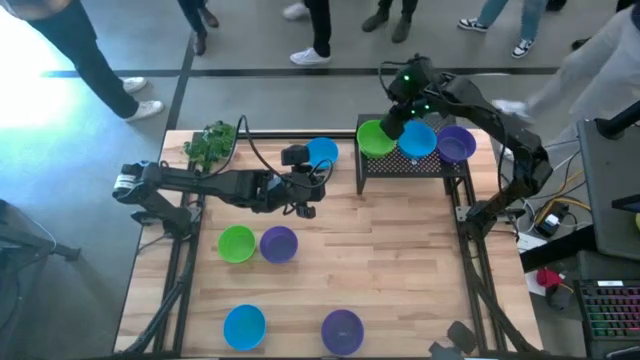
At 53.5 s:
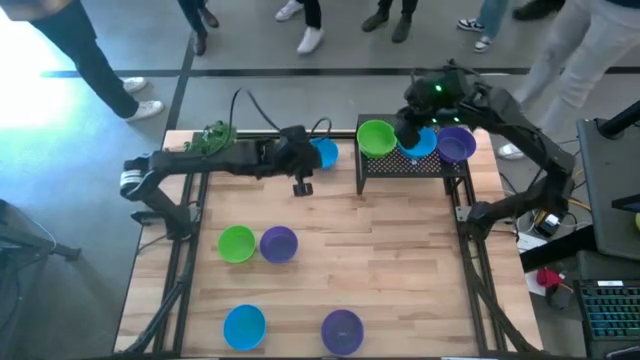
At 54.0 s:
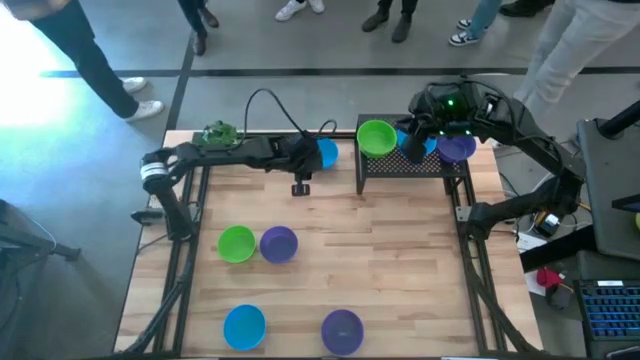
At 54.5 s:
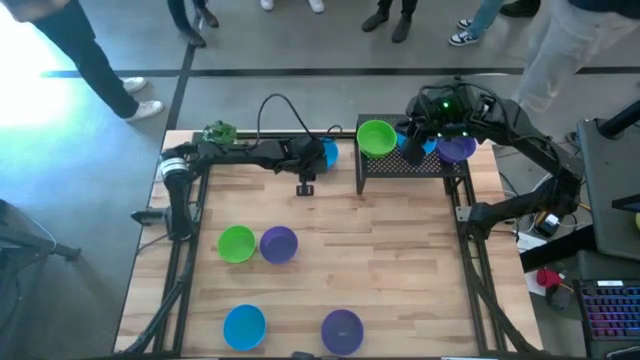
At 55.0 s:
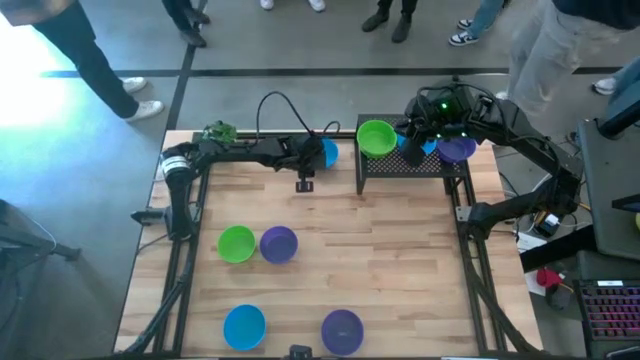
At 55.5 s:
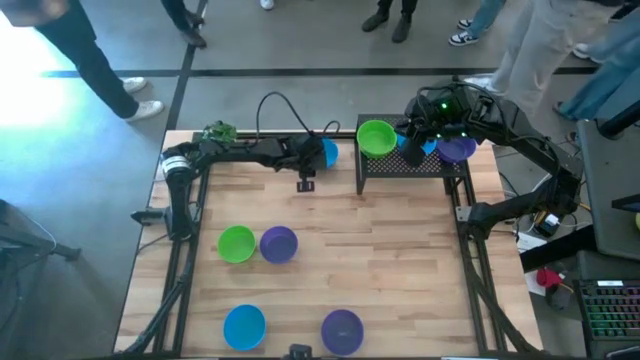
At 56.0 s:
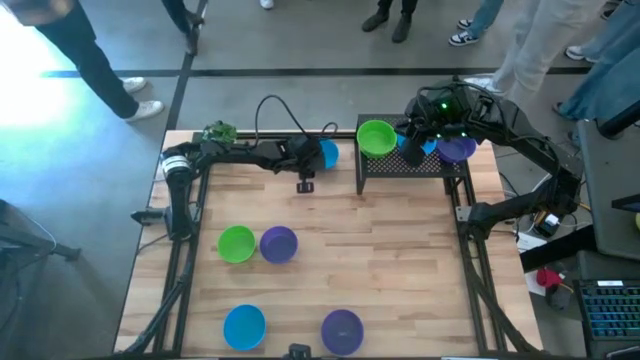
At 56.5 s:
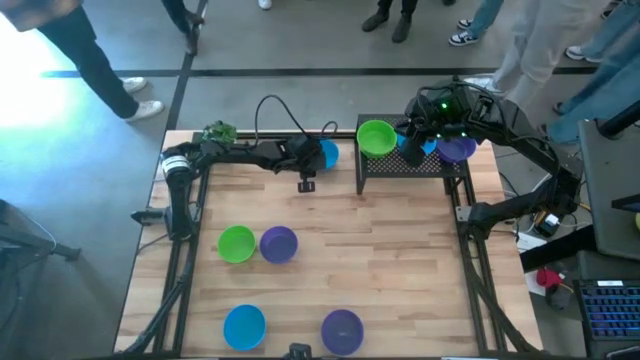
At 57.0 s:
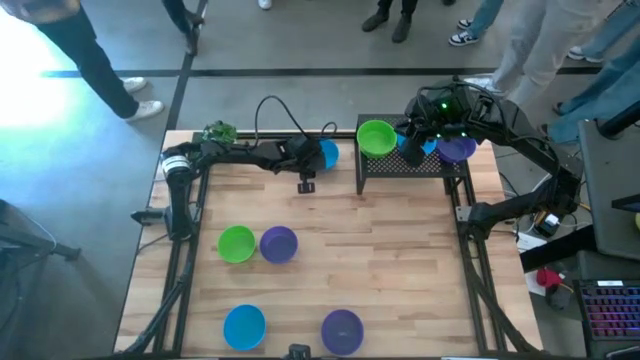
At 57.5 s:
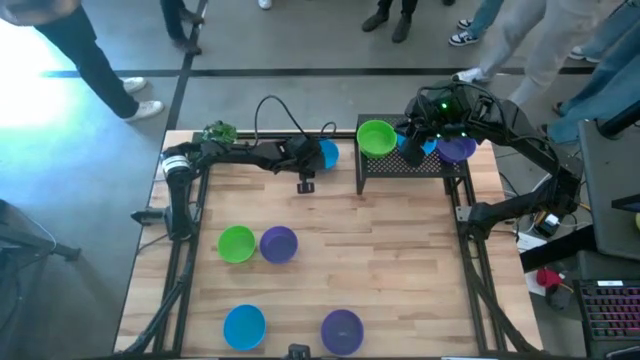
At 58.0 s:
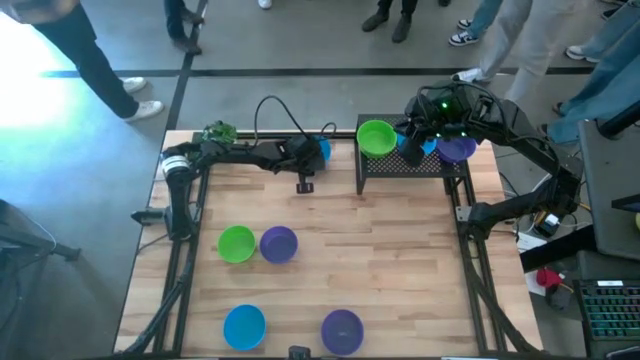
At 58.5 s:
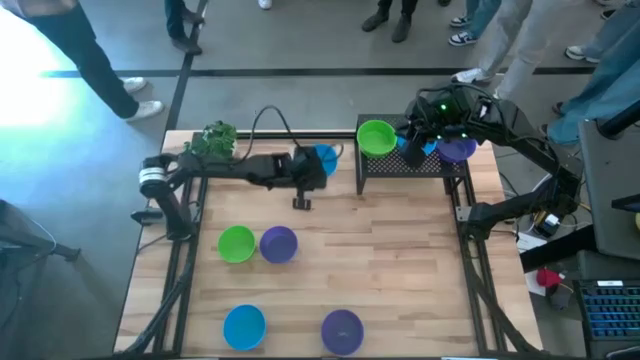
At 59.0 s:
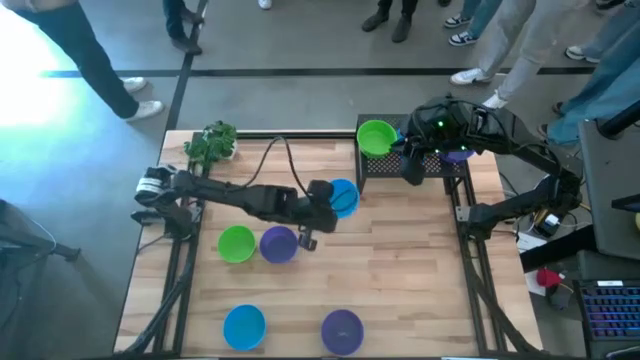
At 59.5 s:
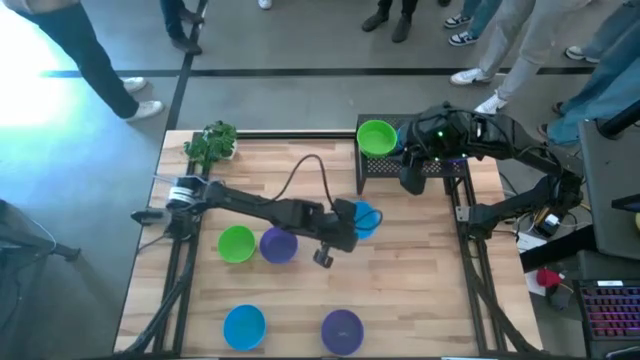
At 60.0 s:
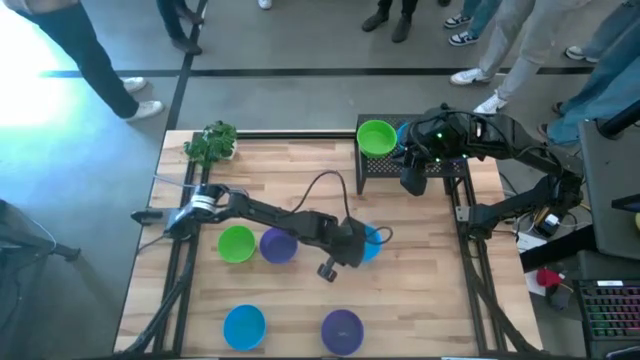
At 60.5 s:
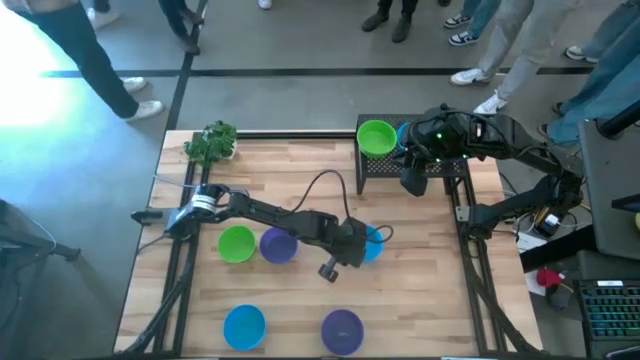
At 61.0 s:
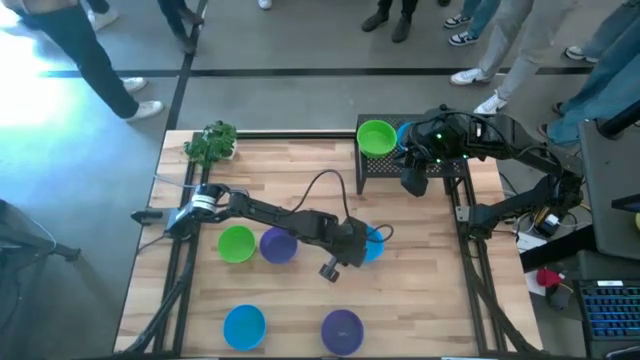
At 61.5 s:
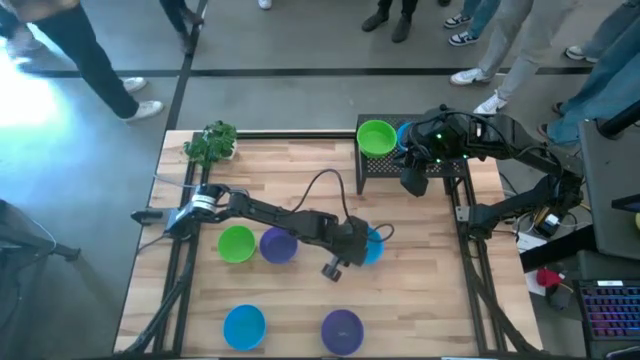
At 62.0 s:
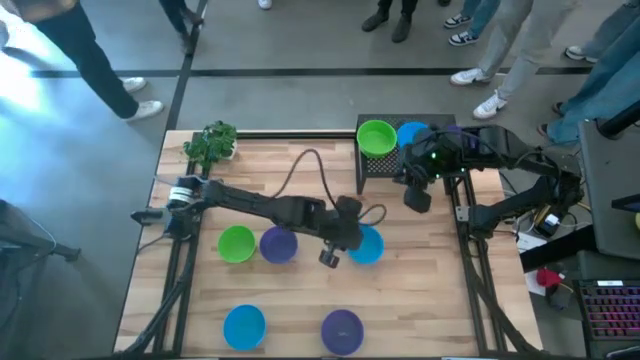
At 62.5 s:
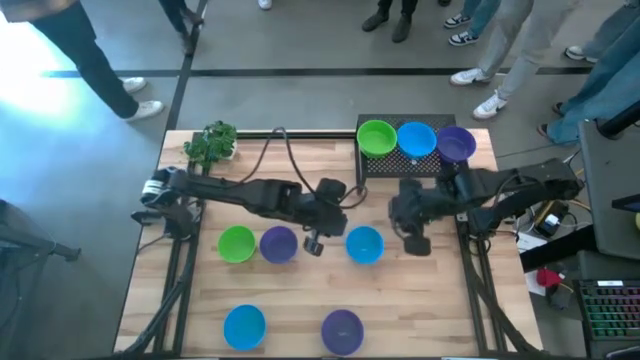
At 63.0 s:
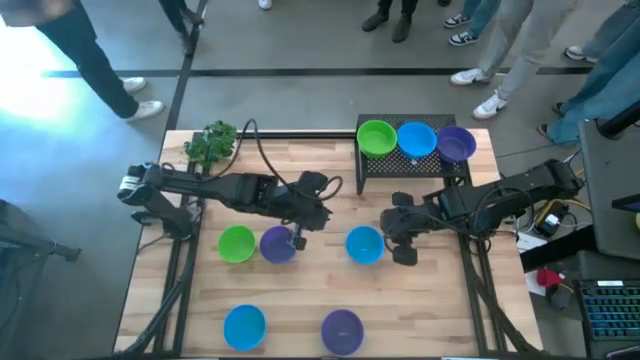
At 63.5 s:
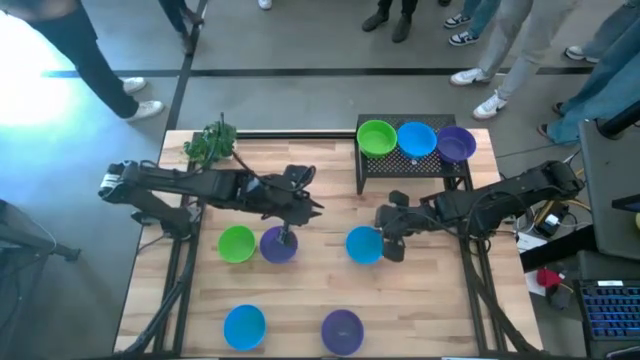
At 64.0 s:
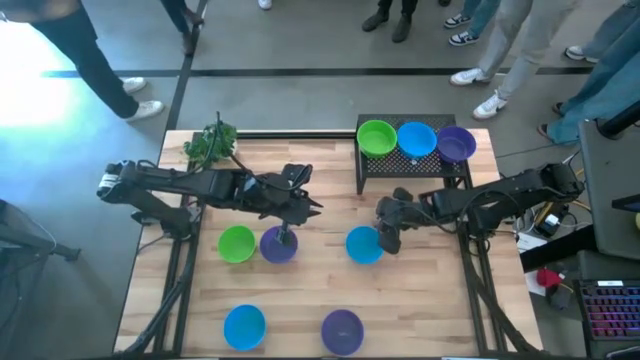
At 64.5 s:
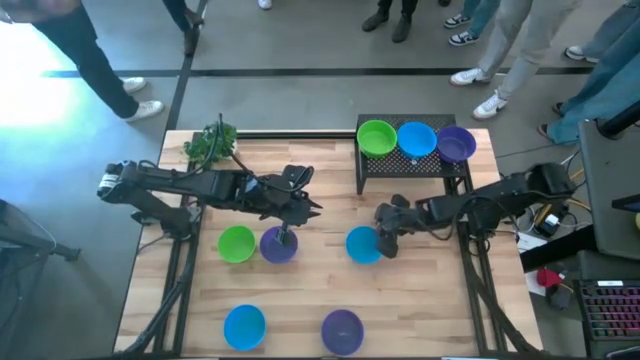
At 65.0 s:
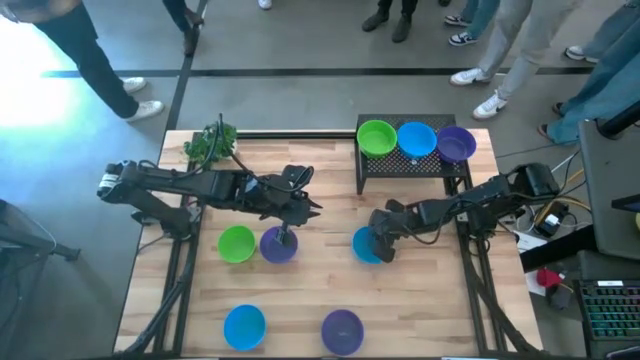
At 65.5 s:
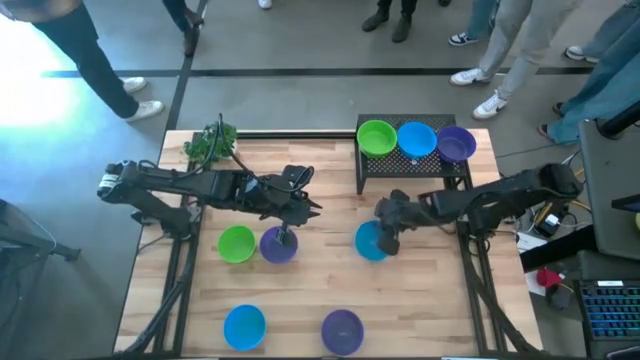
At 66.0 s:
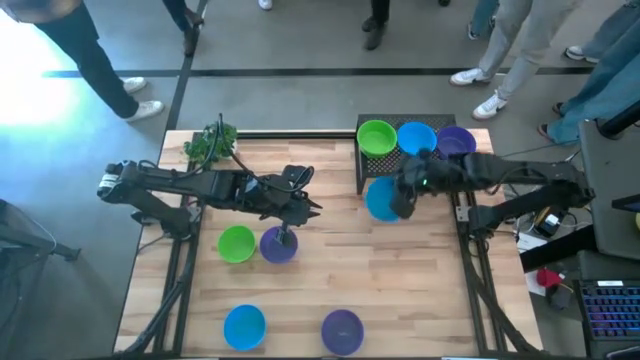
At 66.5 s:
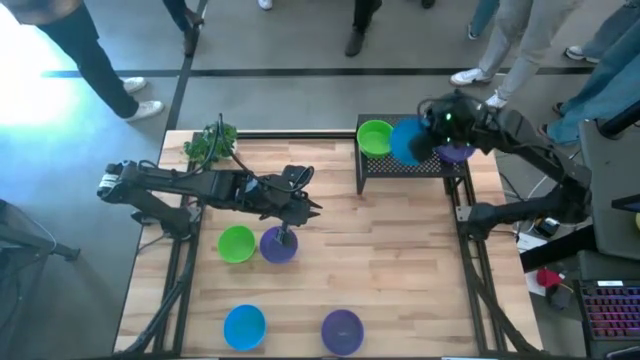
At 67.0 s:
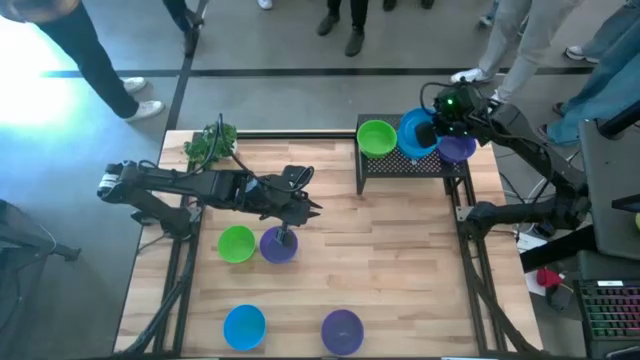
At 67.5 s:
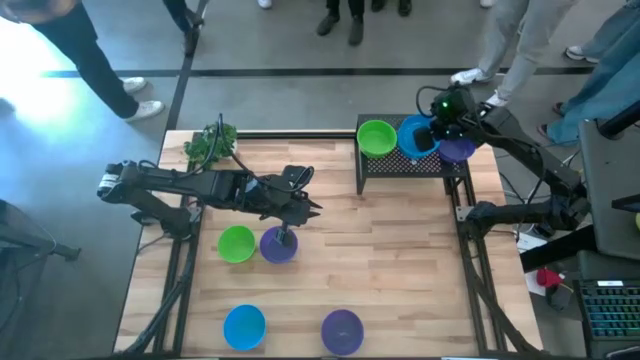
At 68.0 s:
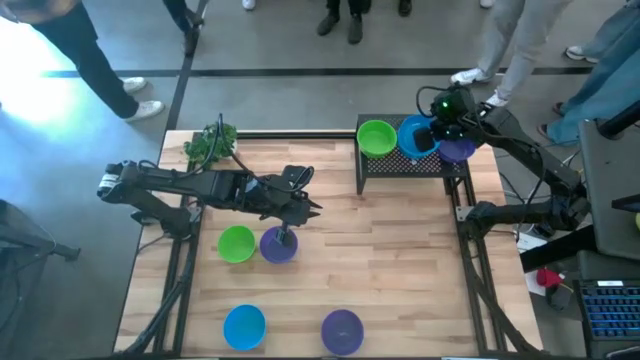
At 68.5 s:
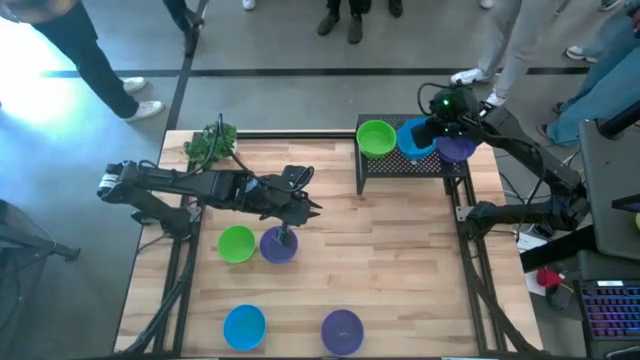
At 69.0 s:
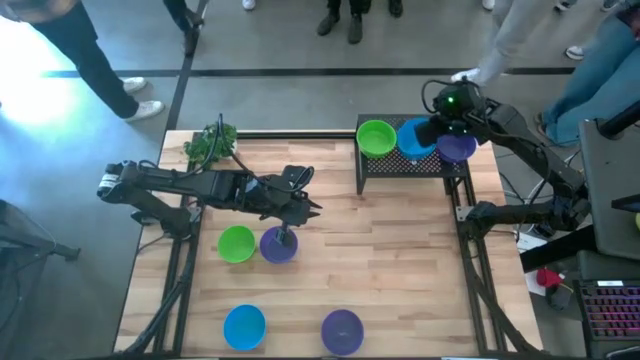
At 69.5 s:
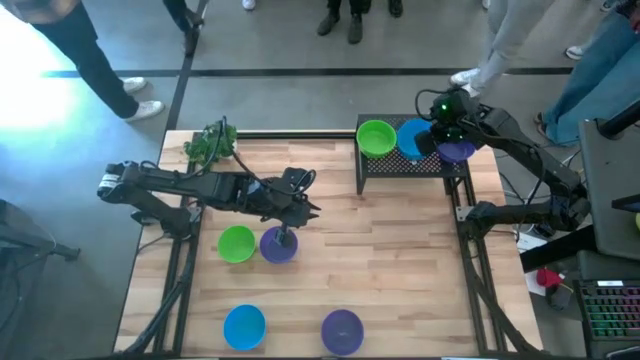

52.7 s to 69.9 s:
Task: Pick & Place Mini bowls
Stack the top blue bowl on top of the blue bowl on the shelf

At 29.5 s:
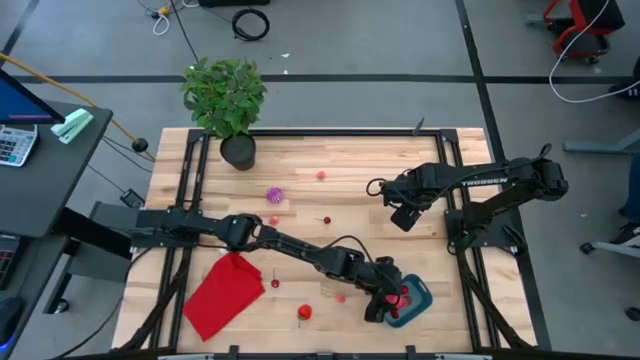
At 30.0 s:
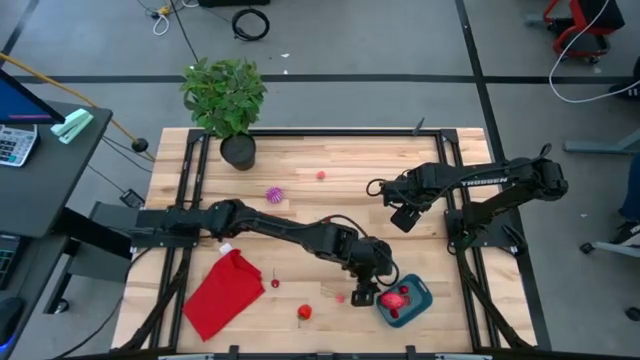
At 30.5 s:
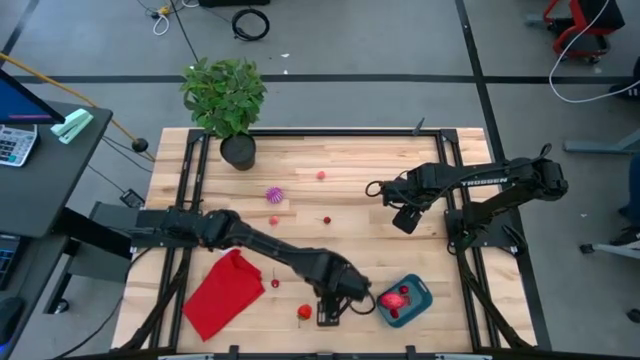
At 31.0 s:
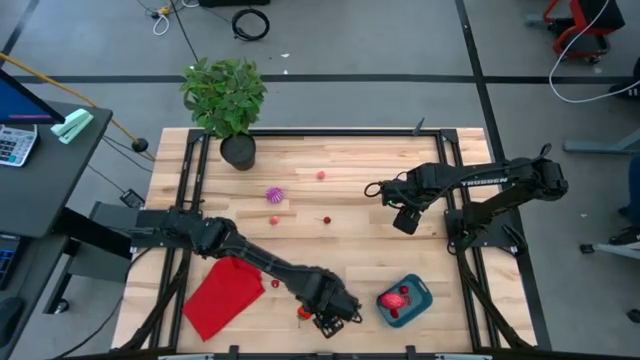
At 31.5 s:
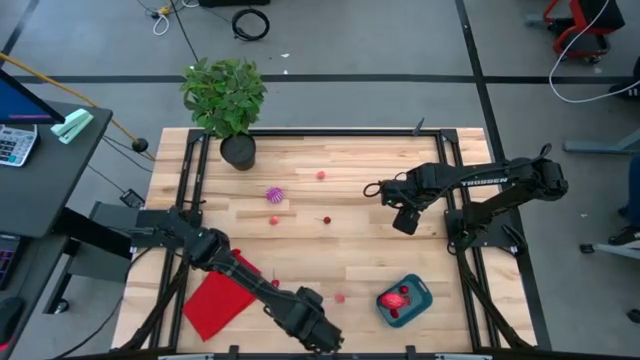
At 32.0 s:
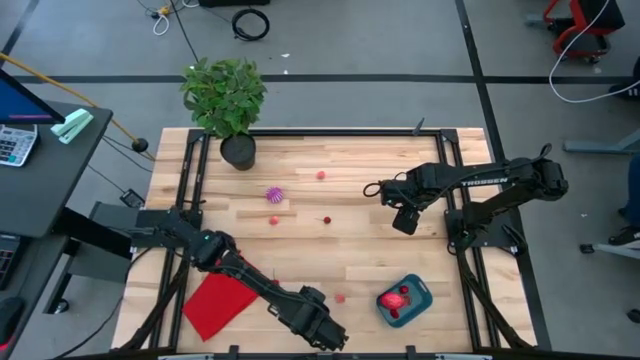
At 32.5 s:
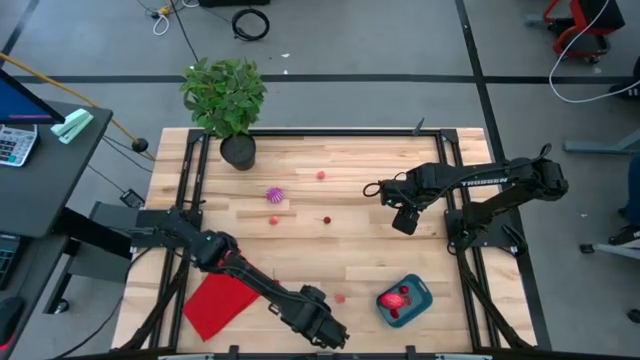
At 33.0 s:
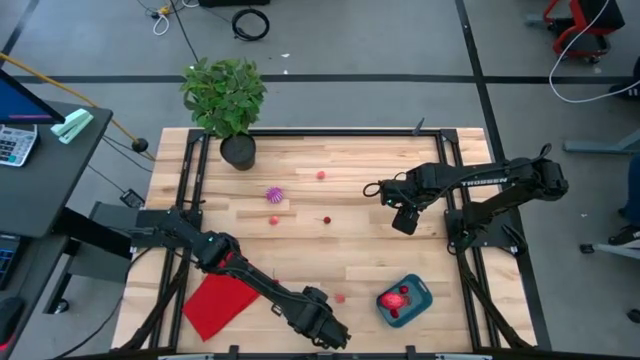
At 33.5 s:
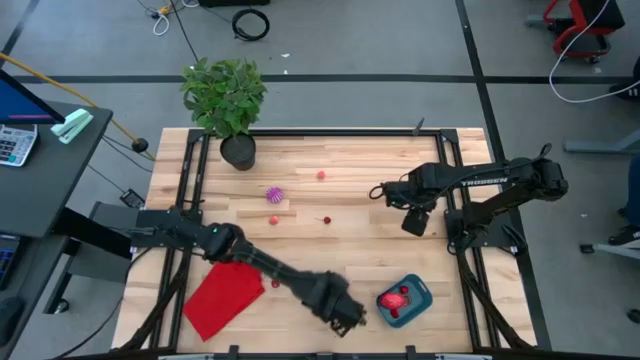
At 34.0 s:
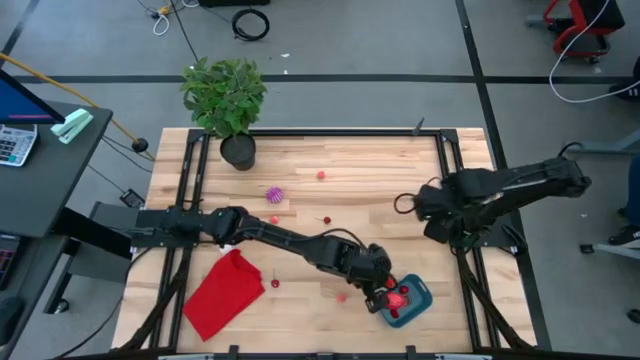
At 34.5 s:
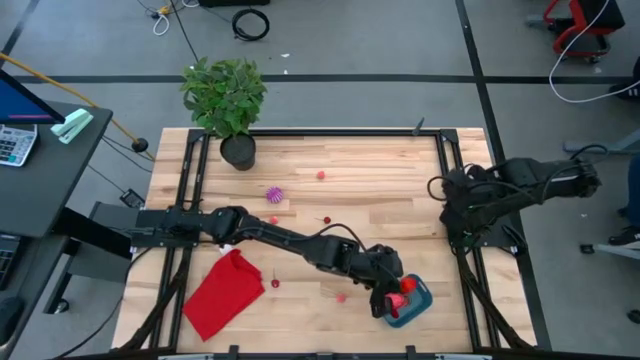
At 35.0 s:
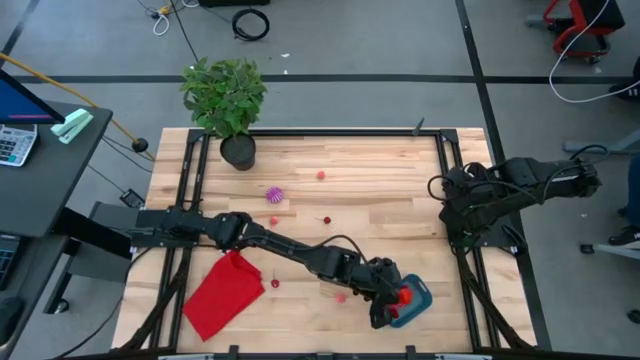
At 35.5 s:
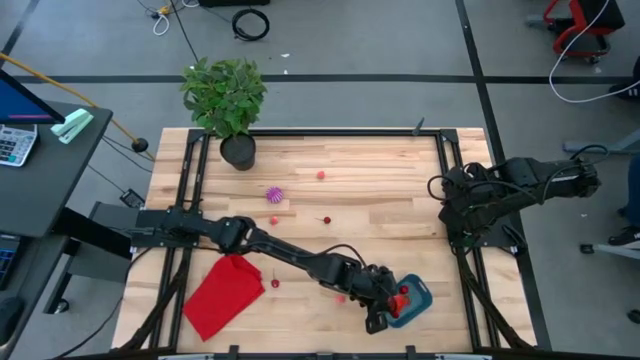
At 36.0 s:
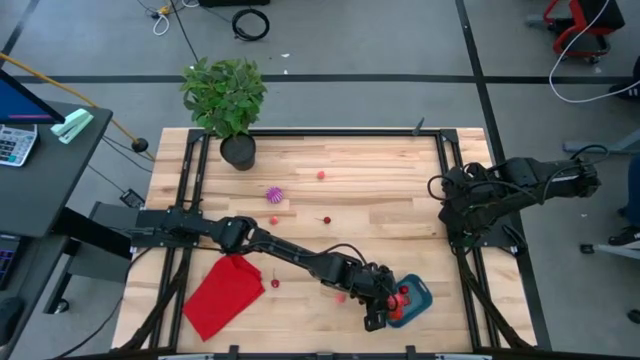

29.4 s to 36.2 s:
Task: Pick and placing Produce into tupperware
Put the strawberry into the bin
